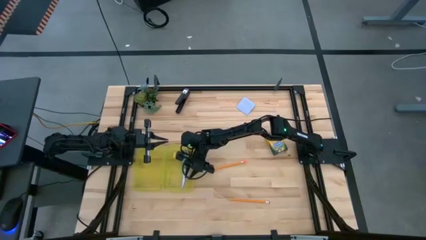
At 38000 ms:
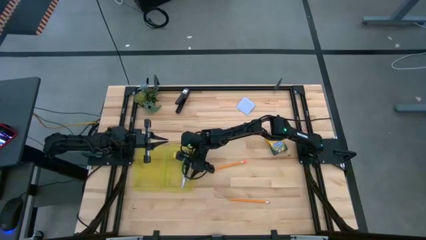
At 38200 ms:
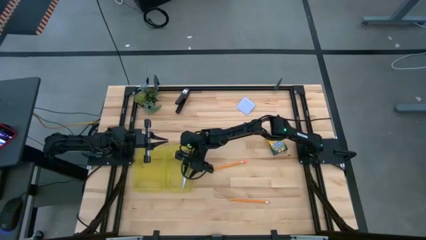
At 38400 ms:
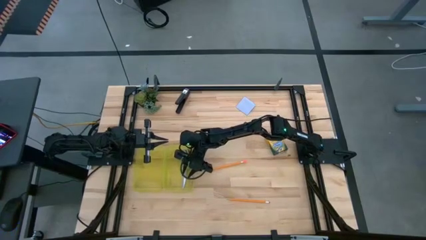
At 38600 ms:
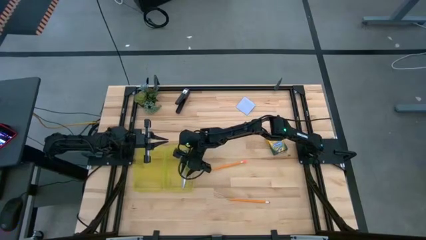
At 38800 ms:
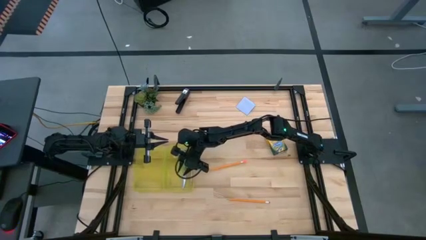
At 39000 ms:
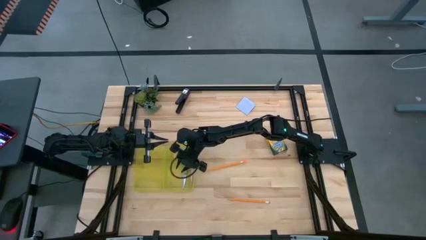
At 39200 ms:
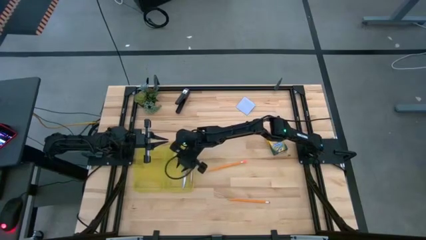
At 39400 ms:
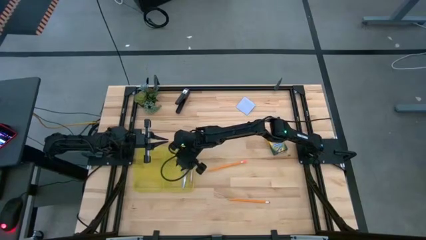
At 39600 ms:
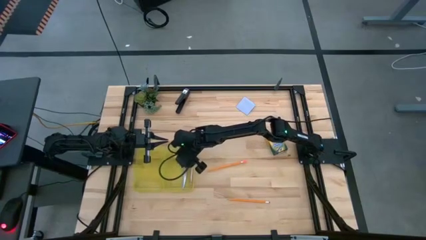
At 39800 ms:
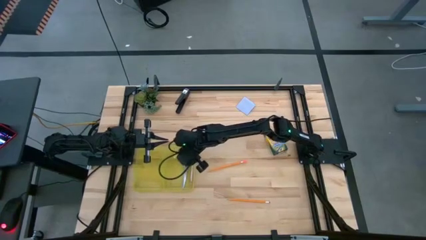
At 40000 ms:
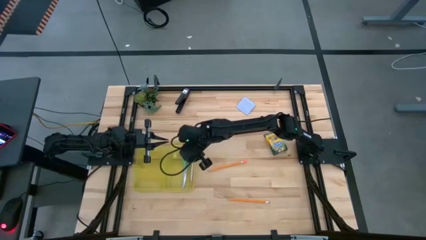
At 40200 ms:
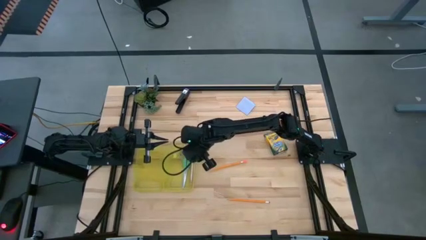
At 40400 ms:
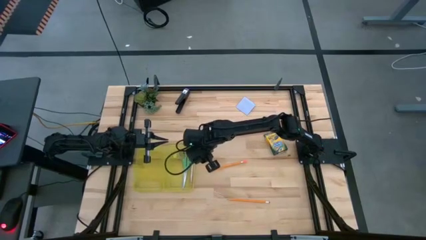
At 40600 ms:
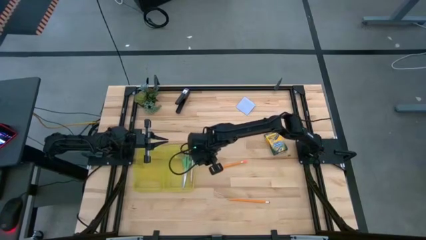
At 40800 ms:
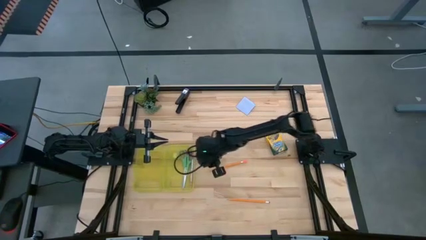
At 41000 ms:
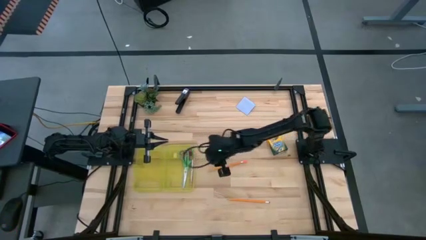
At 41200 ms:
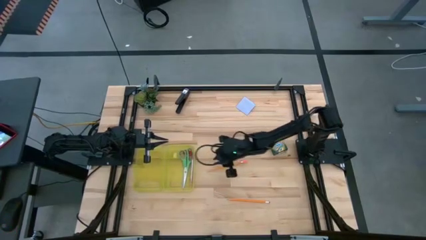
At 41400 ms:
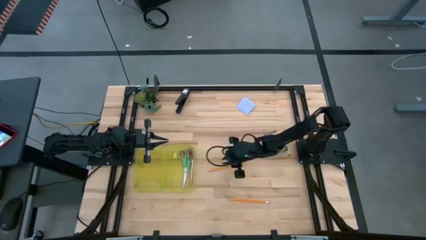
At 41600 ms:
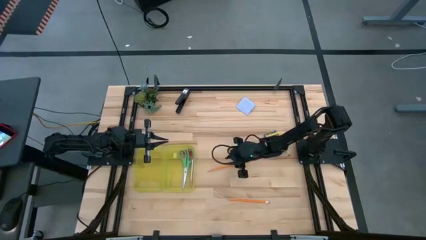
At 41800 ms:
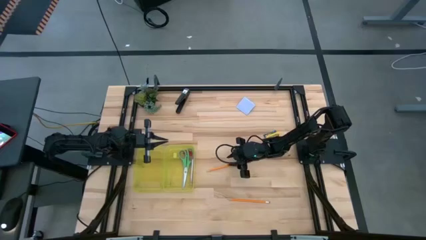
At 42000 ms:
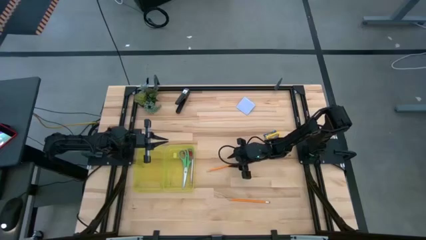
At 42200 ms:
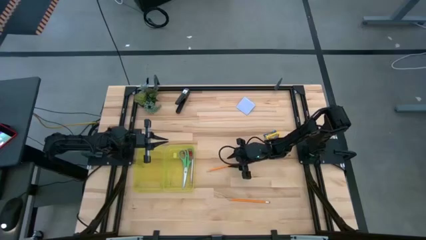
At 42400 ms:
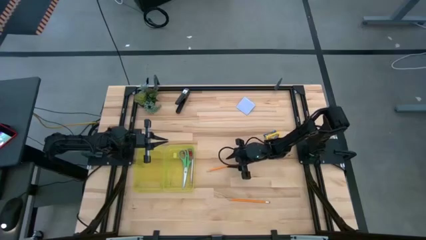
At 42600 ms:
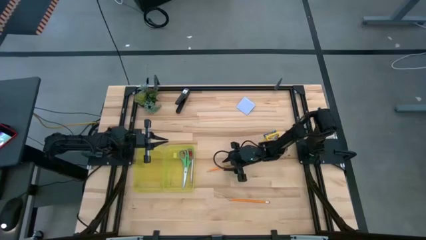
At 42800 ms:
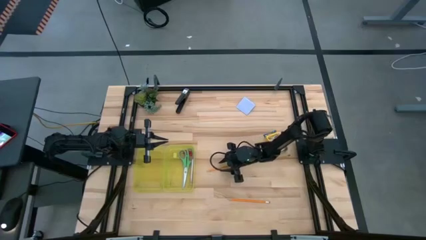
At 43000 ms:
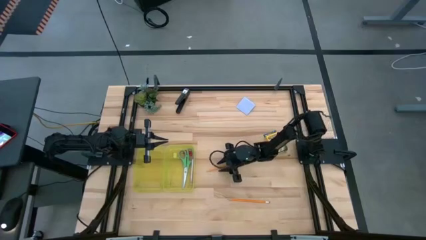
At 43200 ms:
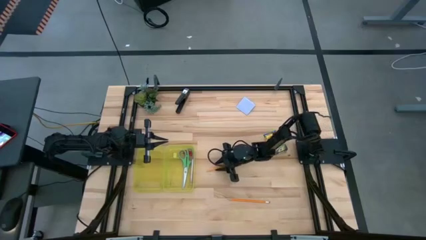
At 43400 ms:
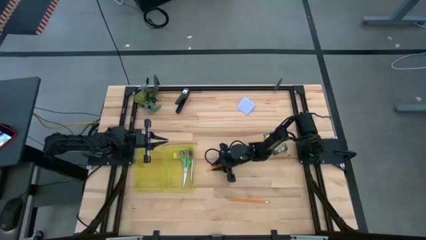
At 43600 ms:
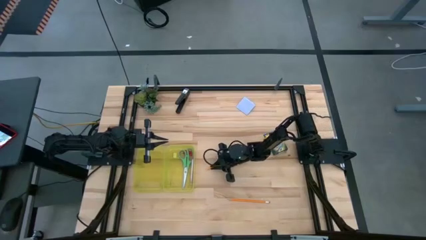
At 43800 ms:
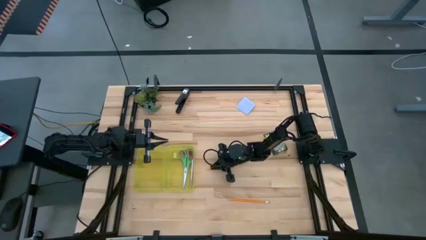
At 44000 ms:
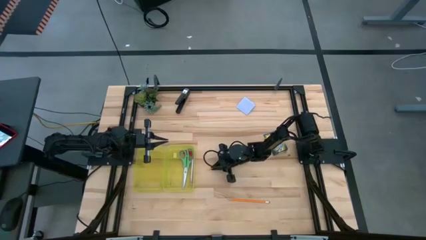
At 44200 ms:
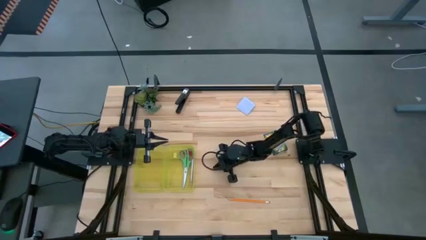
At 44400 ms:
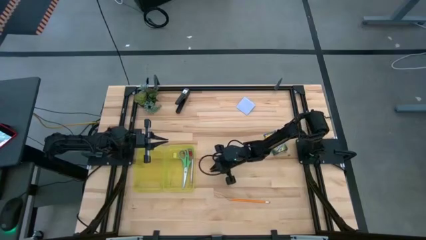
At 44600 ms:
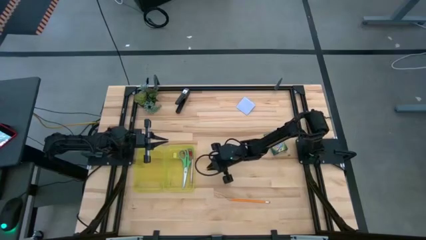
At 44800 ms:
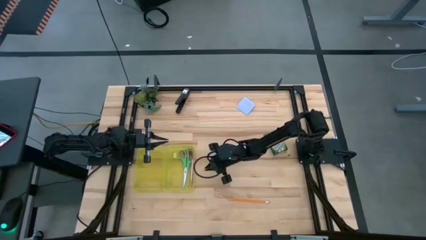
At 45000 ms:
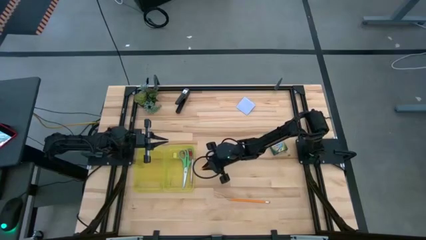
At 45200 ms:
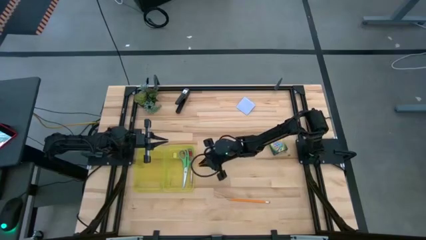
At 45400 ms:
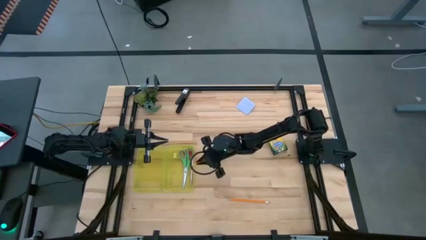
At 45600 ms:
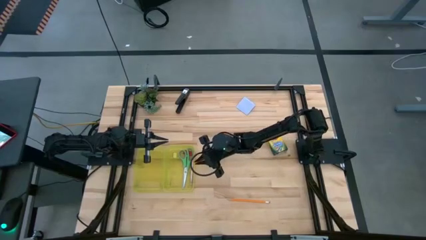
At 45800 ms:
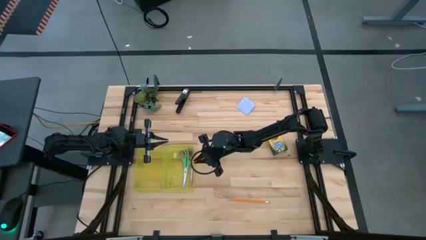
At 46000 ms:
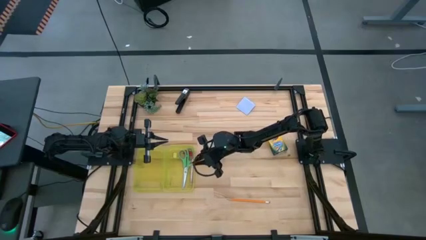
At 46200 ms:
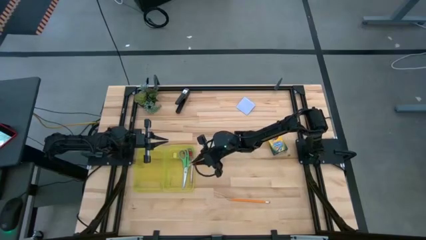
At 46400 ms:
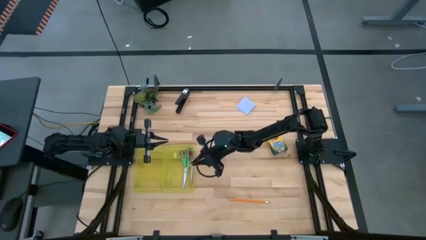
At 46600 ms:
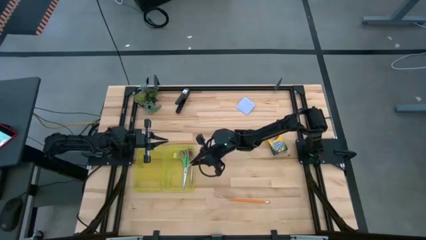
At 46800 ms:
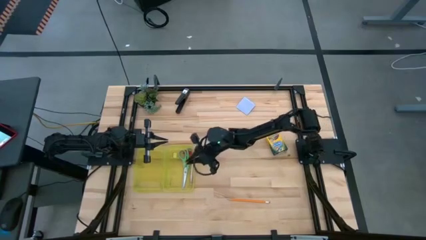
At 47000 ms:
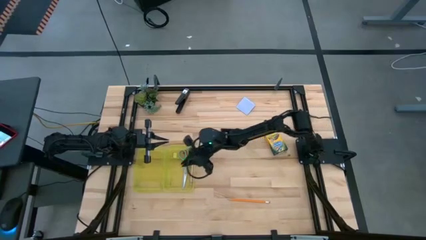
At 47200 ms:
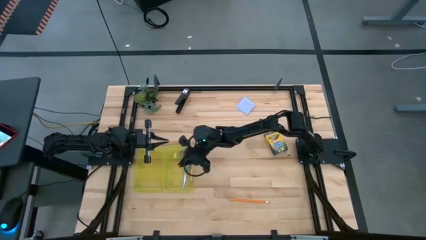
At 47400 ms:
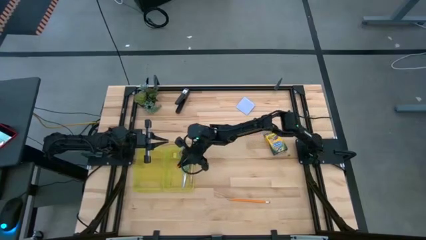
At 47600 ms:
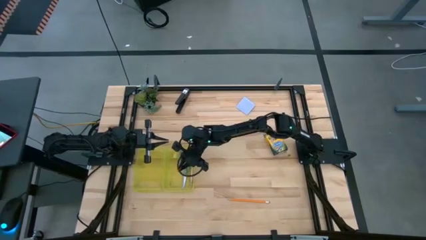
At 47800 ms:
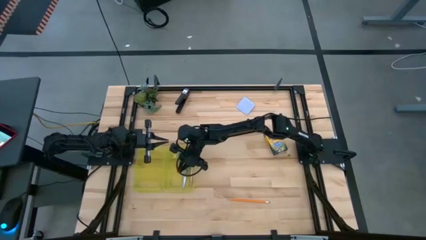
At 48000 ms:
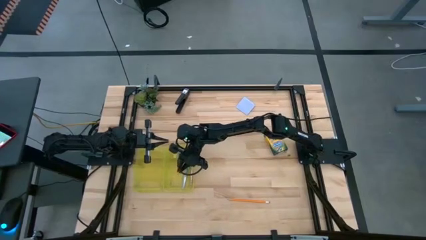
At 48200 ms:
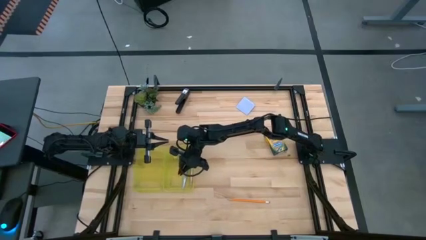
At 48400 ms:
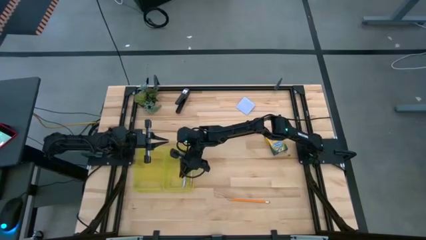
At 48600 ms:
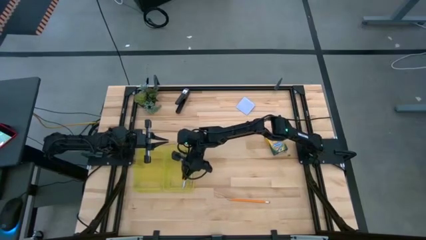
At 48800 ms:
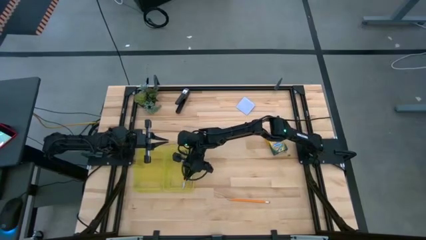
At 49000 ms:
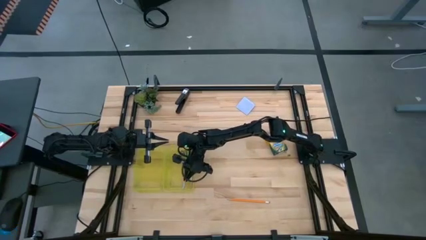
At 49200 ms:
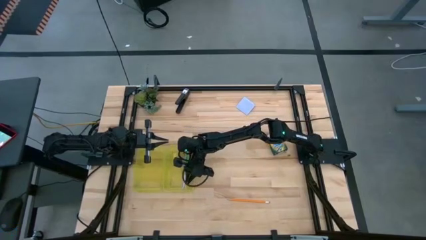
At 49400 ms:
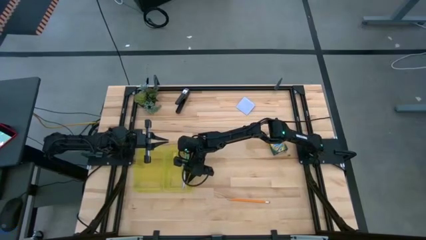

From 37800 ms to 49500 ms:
Task: Pack school essentials
Put the orange pencil into the yellow pencil box

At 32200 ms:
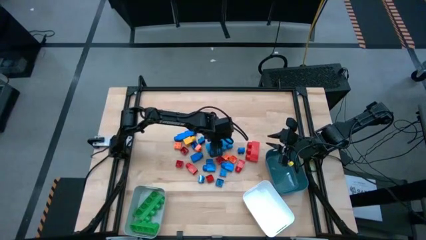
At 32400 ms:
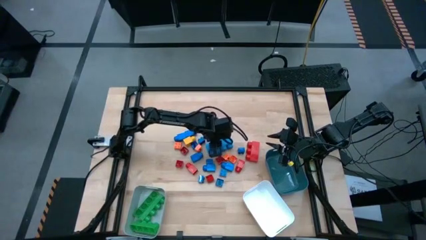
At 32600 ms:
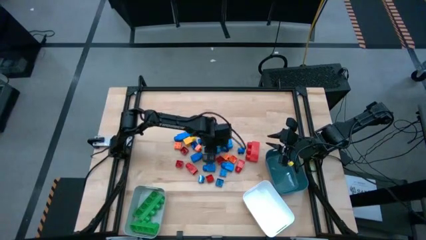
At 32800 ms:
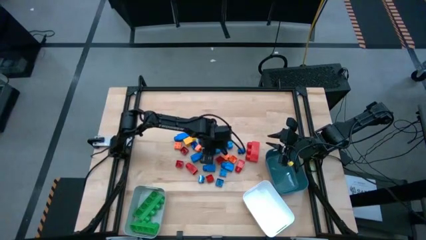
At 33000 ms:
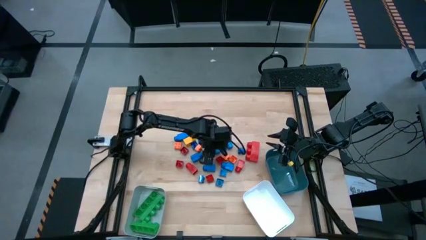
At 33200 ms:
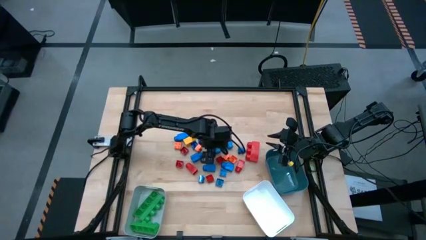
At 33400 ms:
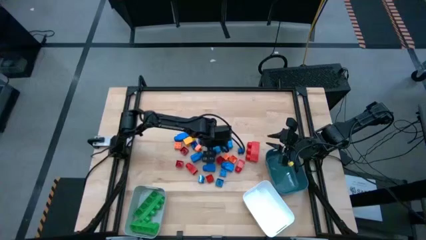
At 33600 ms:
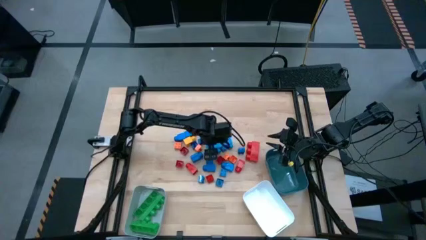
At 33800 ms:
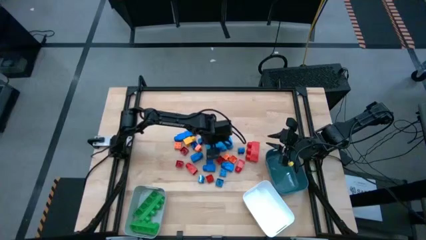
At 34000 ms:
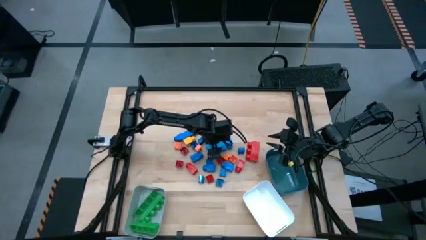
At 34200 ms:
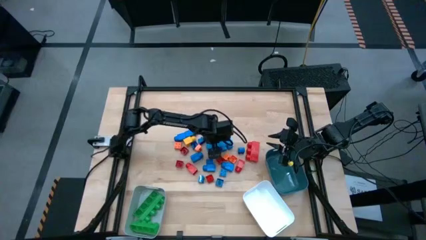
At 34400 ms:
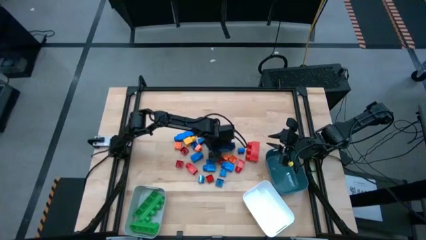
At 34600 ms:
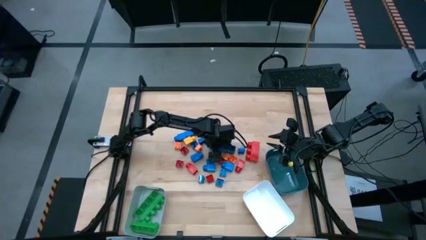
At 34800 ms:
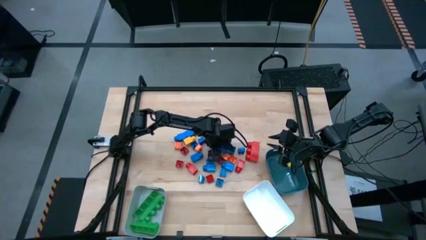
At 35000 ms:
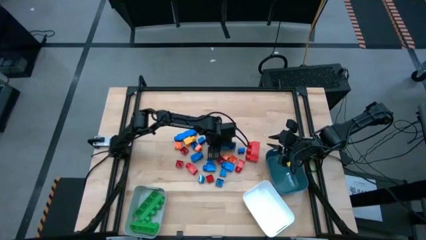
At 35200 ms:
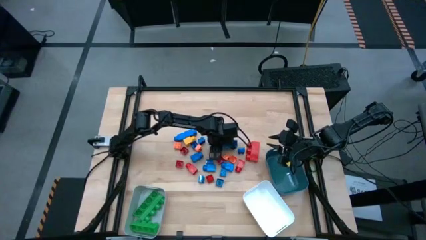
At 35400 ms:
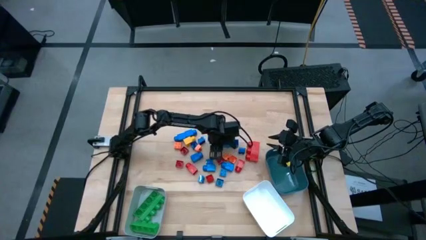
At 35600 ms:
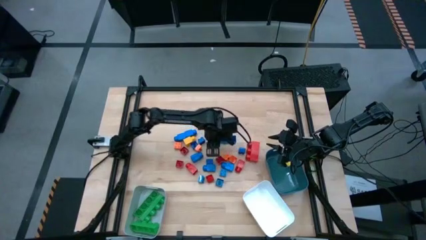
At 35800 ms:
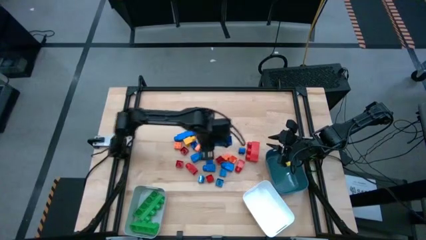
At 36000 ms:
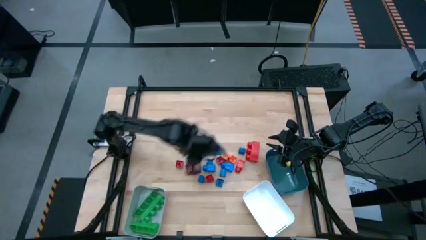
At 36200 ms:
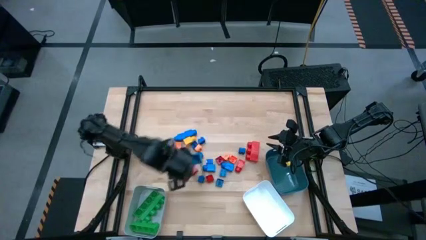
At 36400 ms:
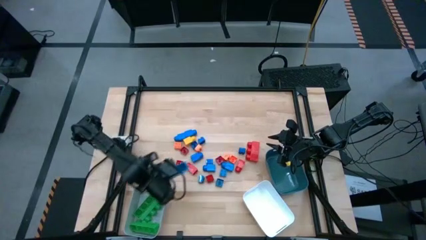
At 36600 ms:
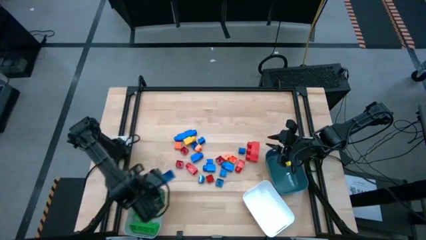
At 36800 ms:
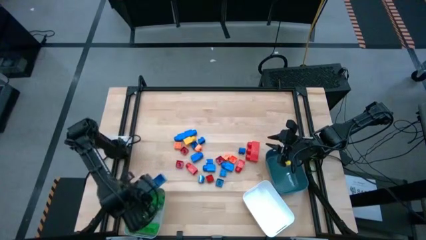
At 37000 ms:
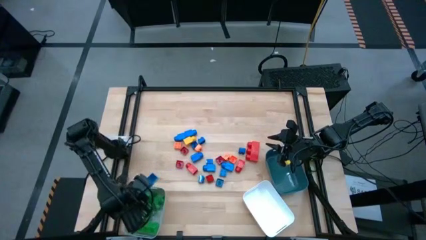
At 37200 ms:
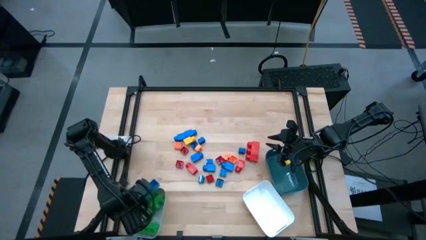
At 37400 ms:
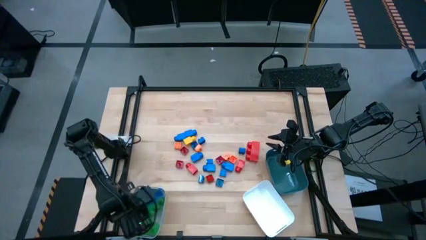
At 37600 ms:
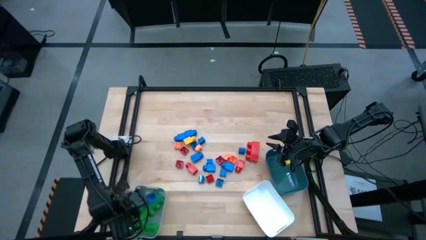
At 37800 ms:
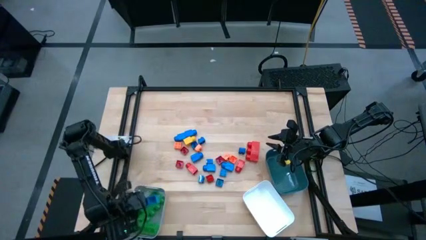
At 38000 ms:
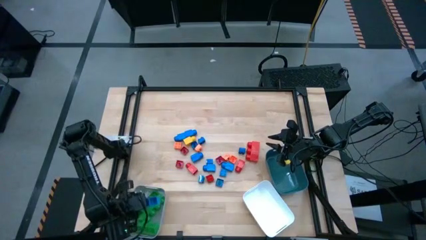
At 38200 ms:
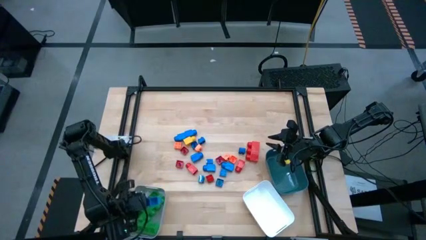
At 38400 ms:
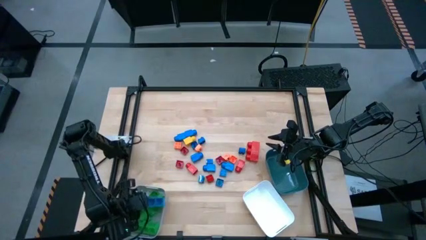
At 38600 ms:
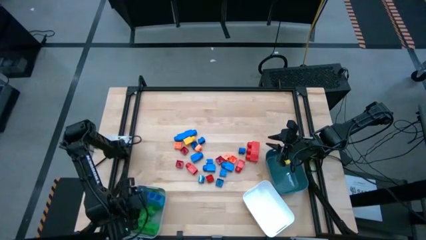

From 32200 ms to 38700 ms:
Task: Sort blocks by size
Put the rectangular blue game piece into the gray bin
